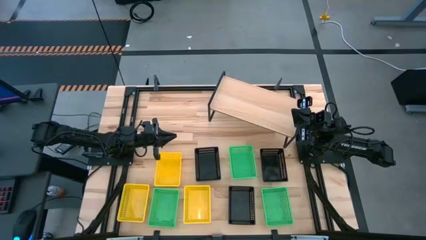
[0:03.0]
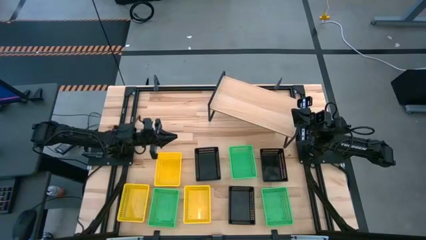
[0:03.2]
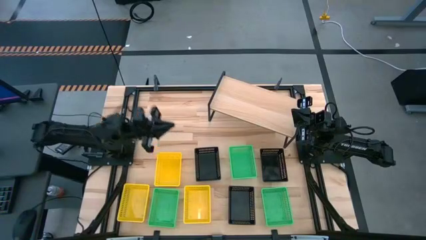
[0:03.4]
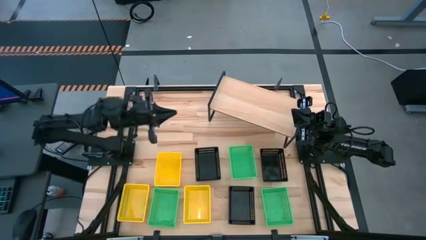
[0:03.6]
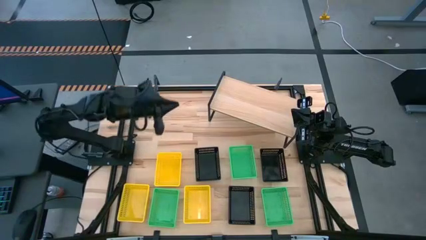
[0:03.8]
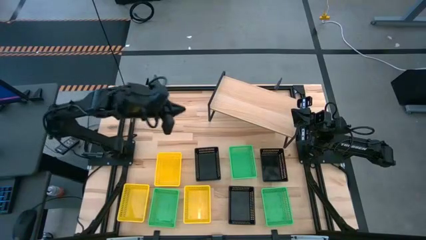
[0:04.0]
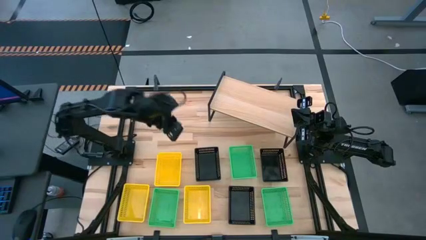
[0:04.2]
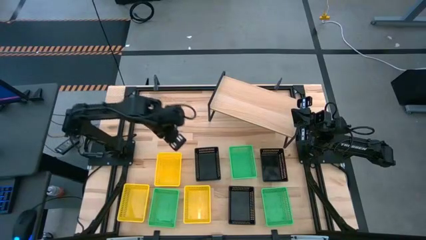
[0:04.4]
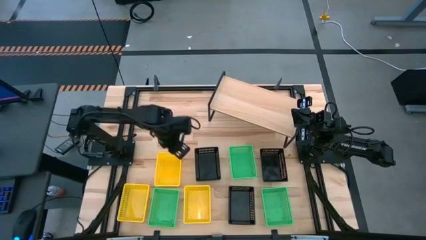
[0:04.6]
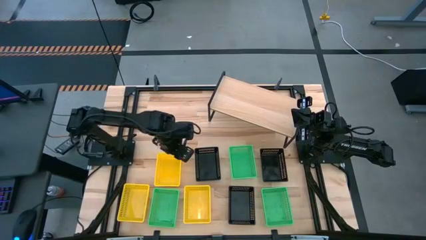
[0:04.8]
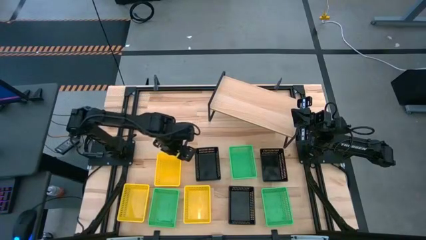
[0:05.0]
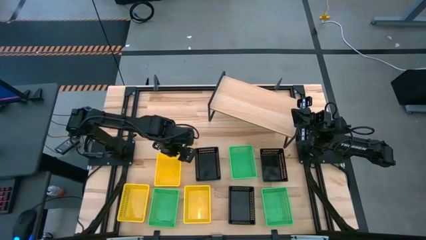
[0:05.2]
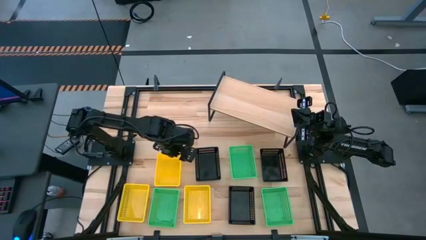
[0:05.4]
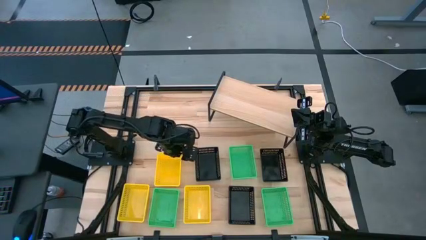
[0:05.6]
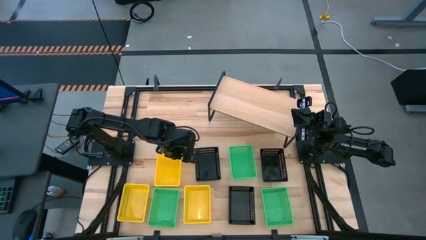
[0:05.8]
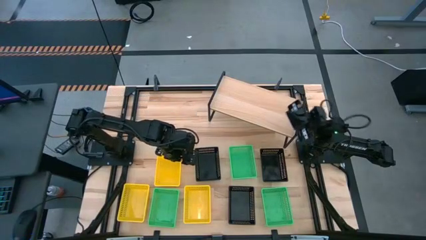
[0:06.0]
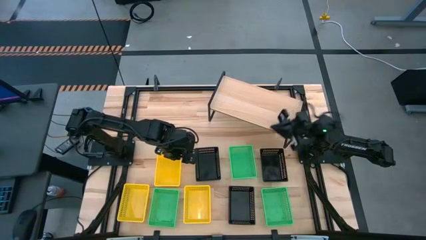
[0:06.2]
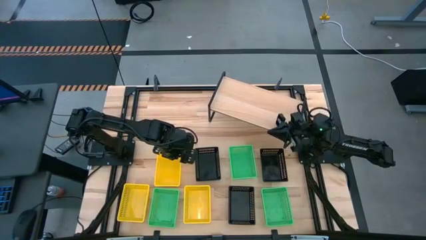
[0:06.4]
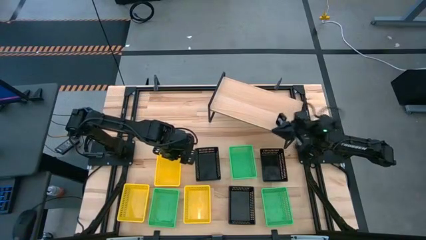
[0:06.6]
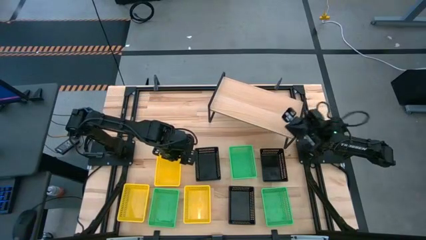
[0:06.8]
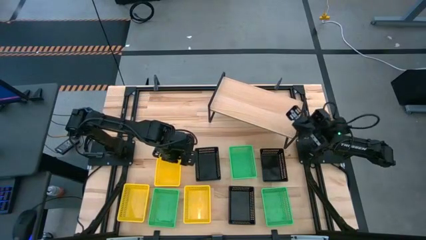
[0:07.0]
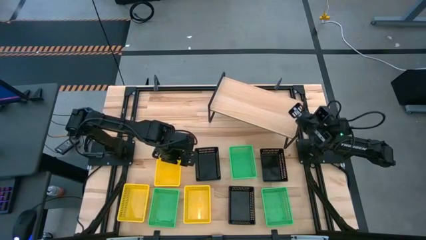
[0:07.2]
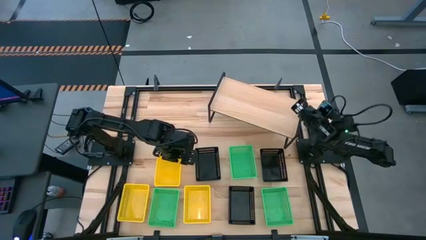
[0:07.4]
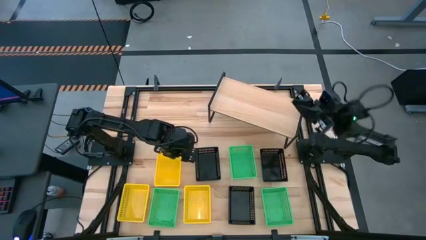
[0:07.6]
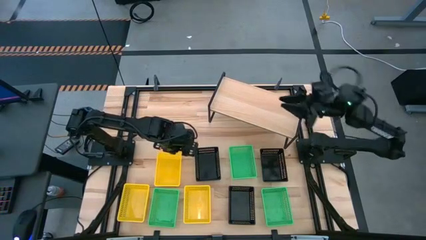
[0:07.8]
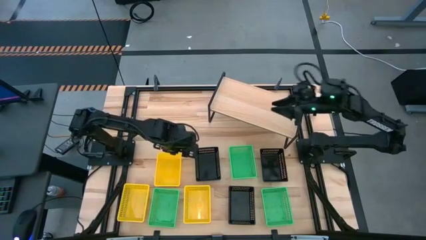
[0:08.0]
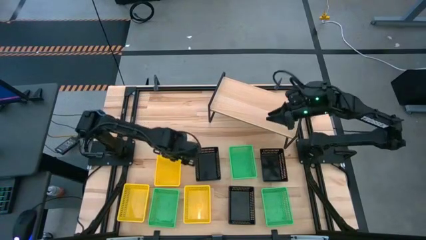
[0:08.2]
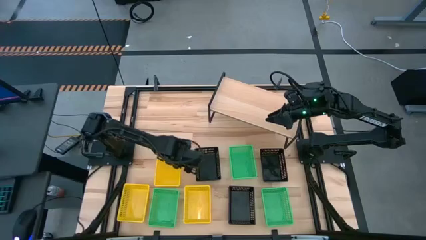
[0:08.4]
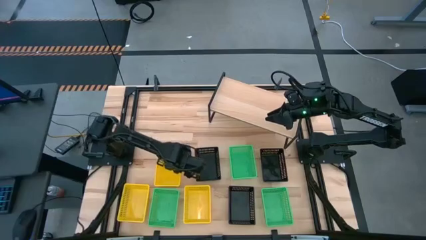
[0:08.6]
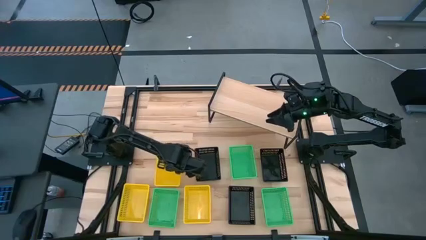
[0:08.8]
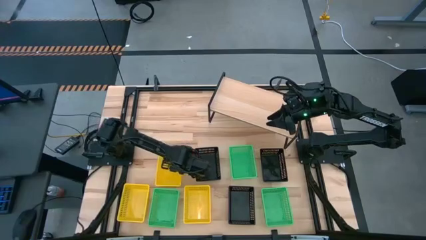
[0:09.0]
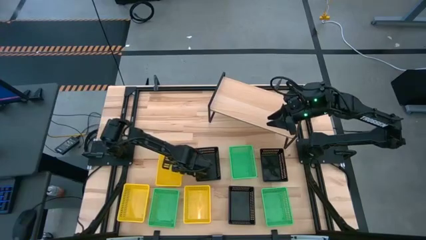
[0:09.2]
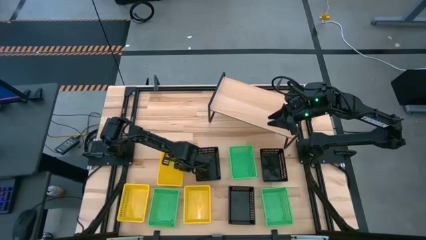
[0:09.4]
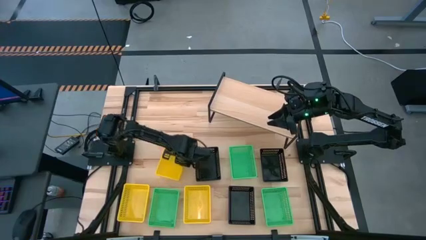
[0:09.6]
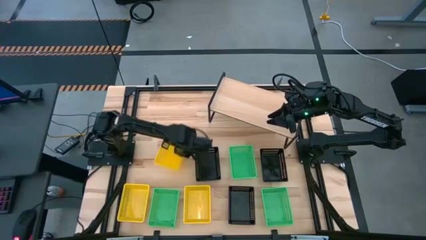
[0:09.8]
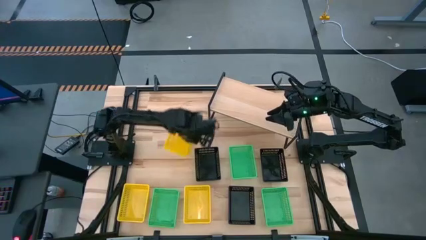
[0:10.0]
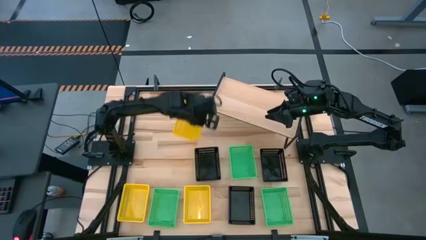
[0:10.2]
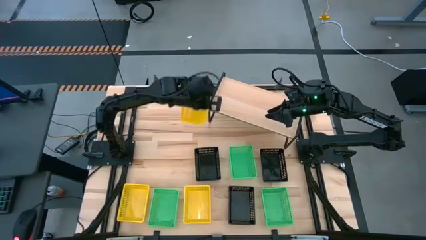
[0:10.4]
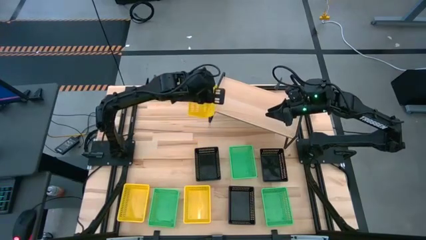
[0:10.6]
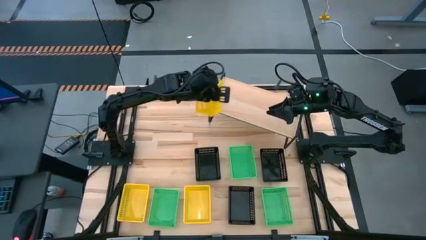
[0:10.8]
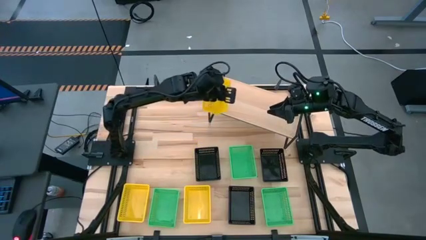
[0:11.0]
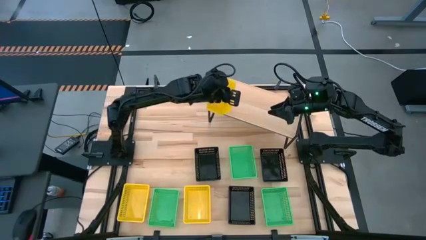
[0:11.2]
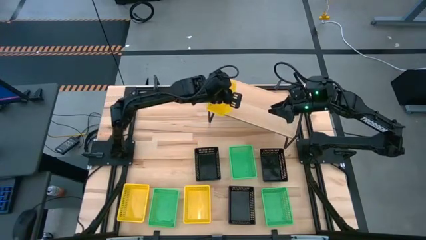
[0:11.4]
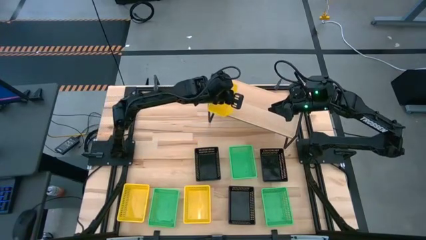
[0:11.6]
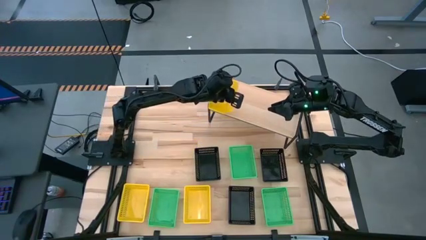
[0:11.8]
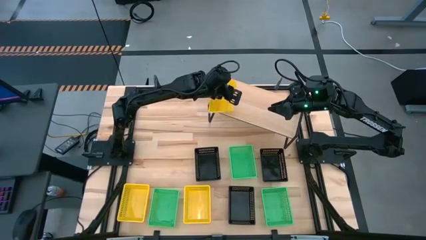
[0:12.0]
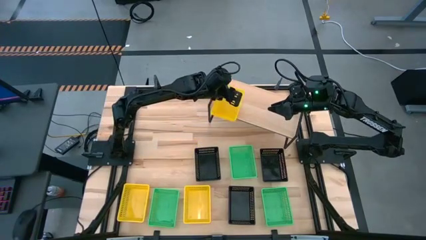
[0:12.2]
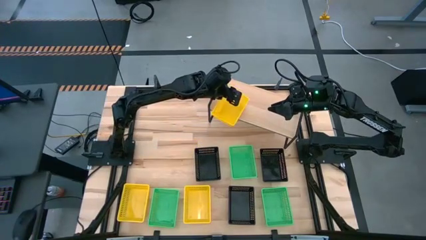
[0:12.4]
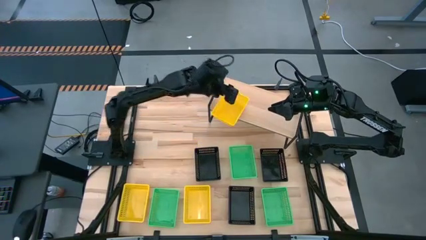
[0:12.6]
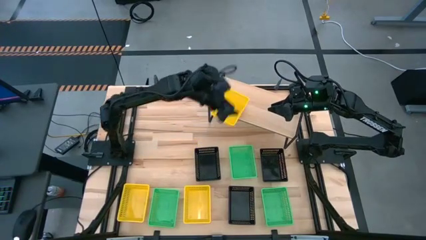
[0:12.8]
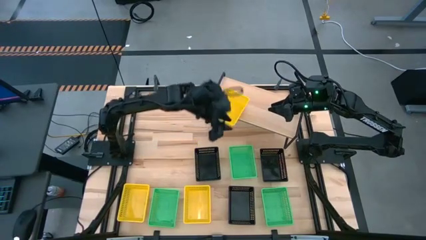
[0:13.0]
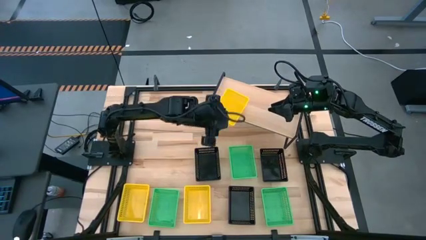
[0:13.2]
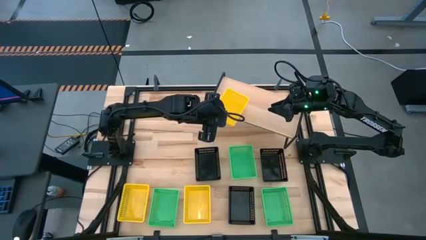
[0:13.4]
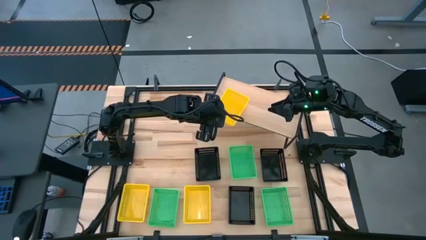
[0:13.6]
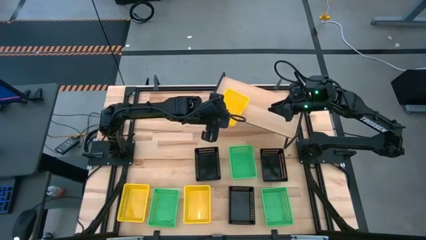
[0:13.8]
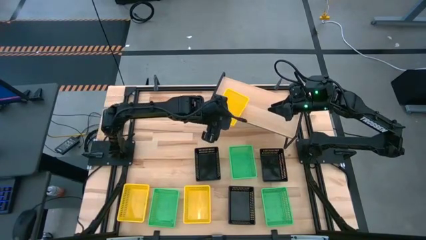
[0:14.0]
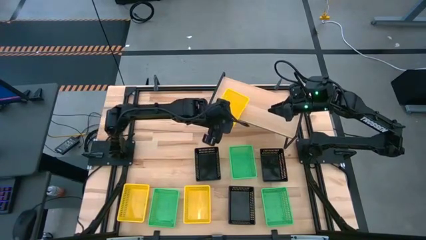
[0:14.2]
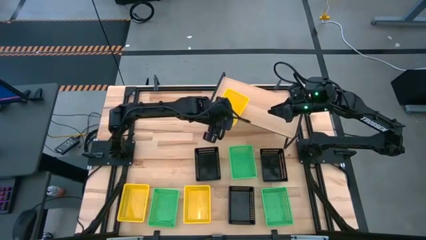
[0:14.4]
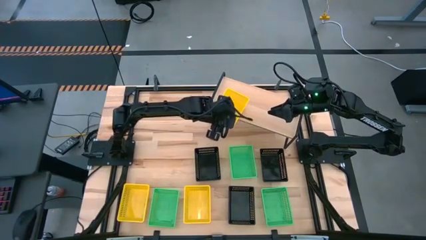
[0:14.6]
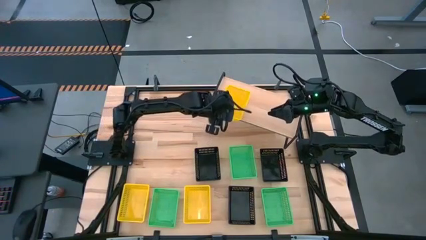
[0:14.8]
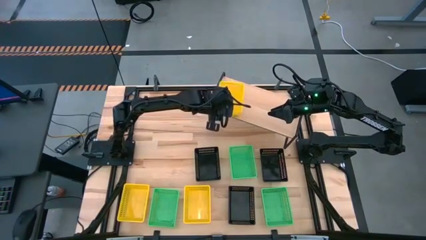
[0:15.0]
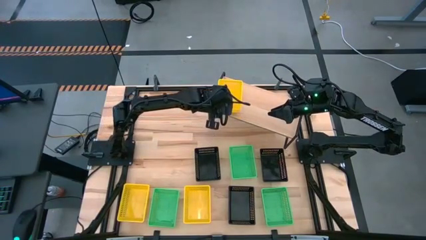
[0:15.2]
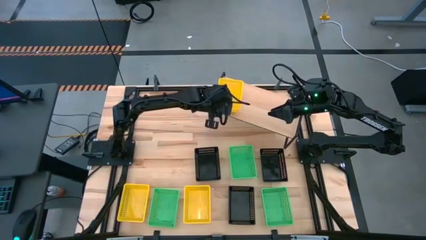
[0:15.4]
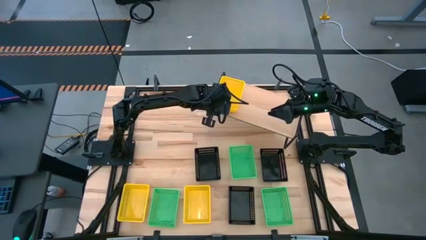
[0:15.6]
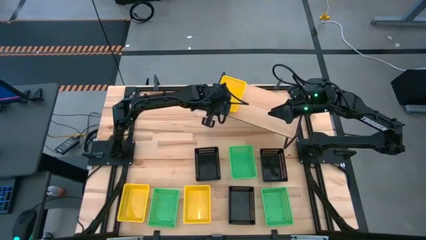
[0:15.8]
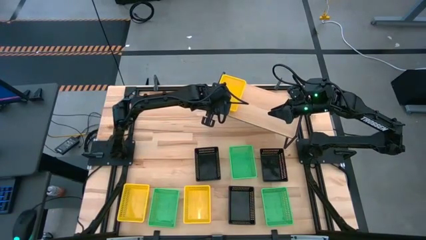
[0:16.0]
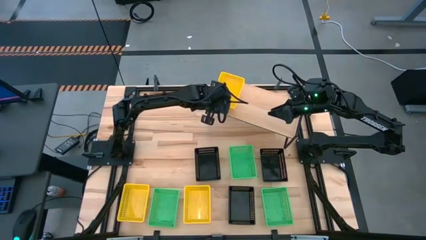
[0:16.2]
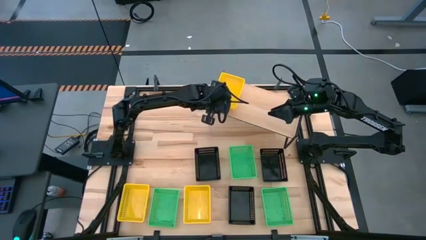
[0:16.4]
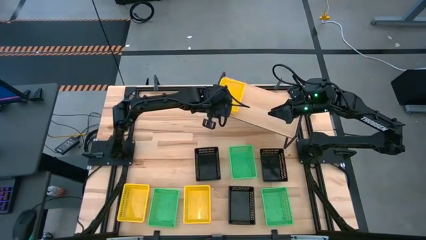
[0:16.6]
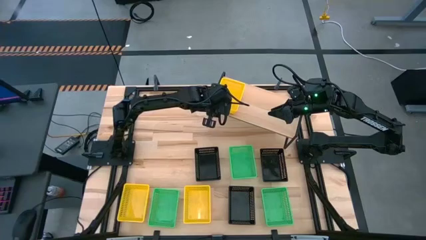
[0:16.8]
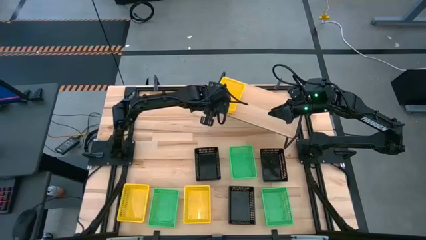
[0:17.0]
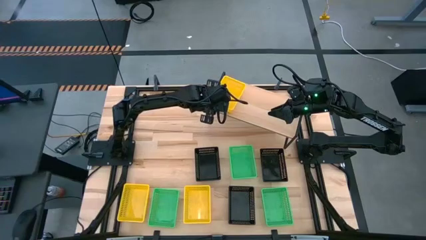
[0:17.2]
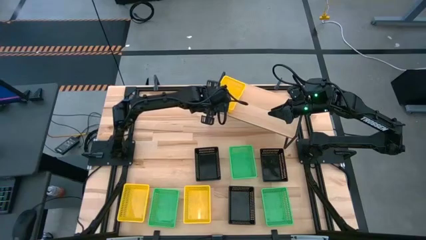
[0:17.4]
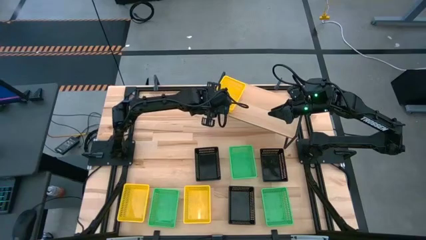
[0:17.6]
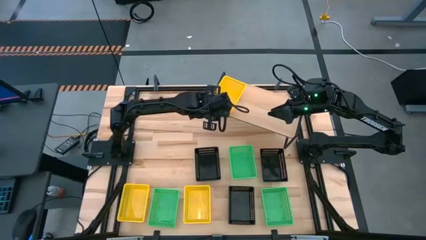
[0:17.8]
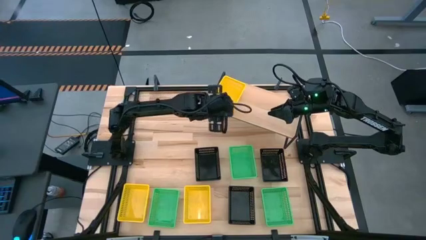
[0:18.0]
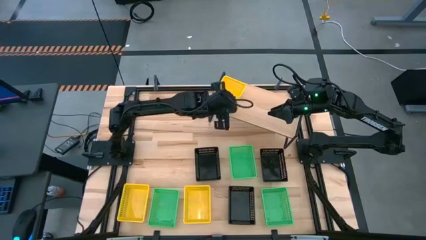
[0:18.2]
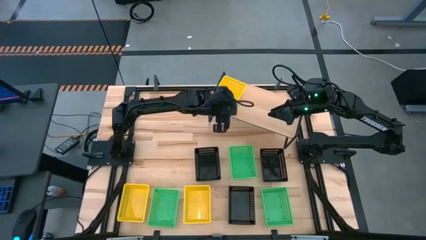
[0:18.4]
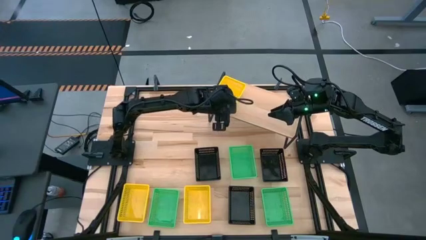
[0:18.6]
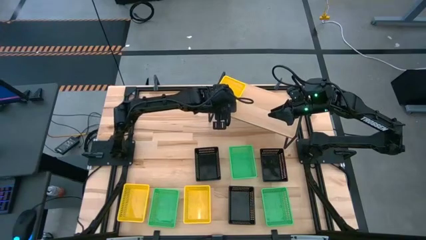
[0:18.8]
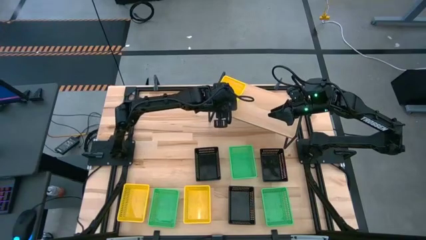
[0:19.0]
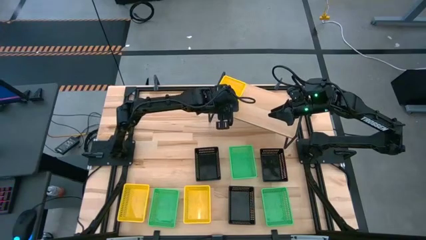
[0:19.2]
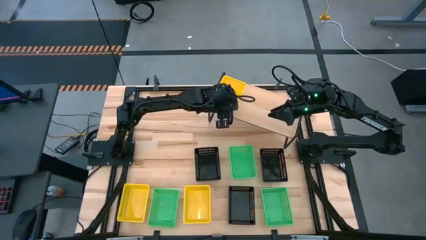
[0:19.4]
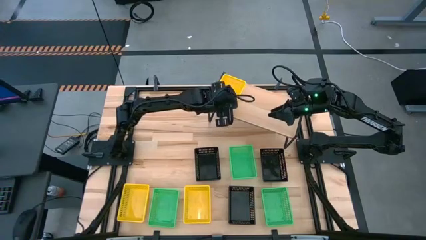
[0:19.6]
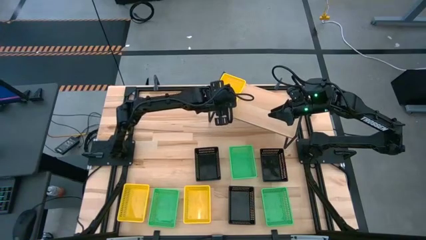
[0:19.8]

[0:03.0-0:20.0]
Task: Stack baskets on shelf by color
Put the top yellow bin on the shelf
